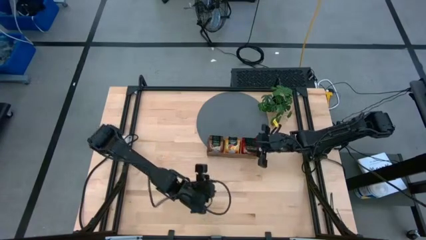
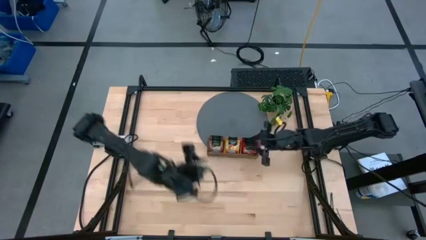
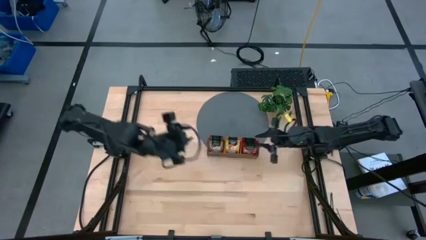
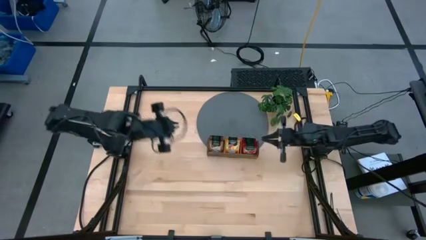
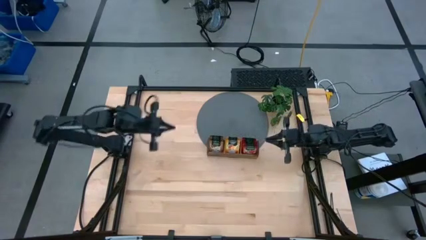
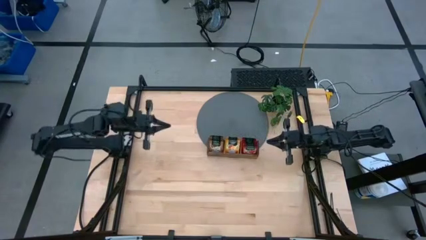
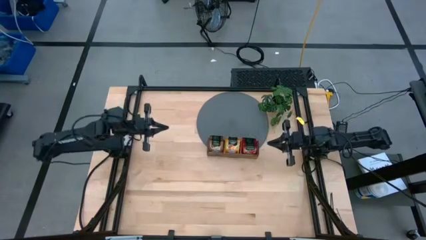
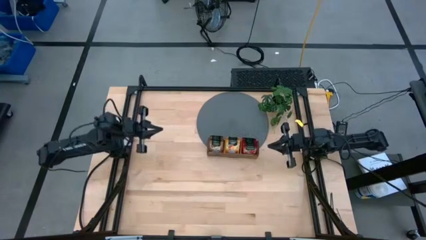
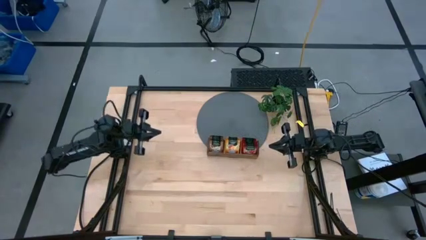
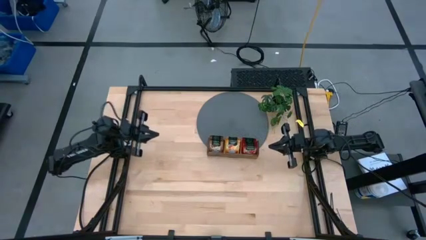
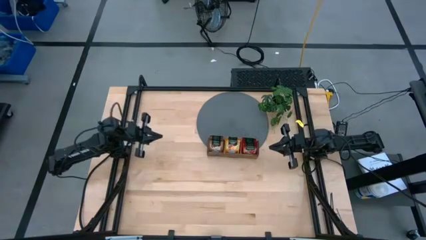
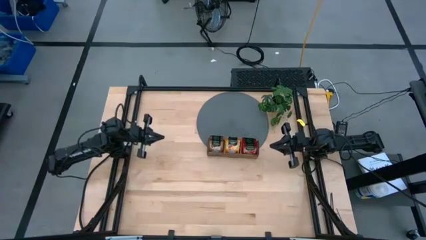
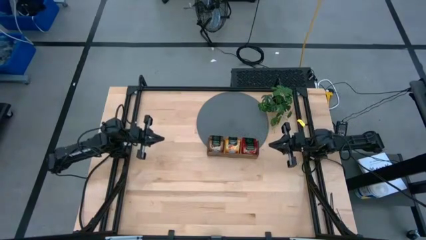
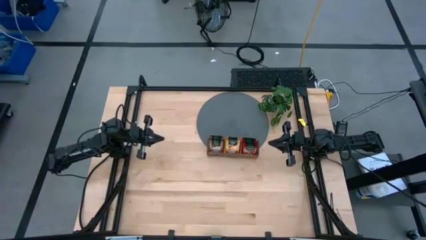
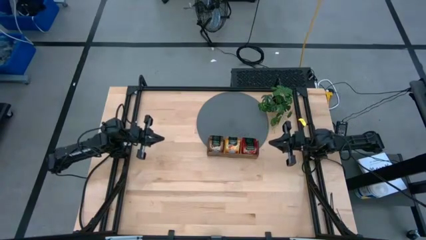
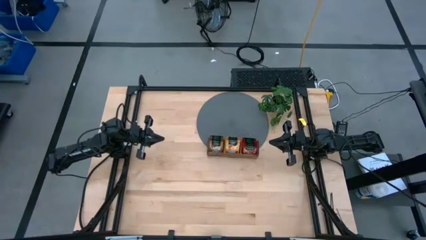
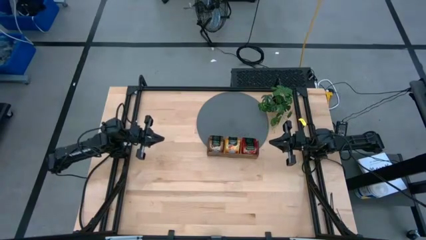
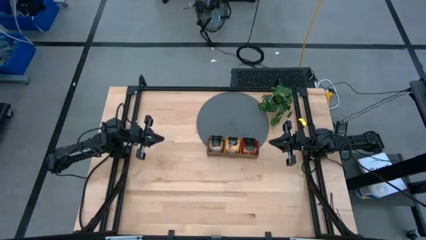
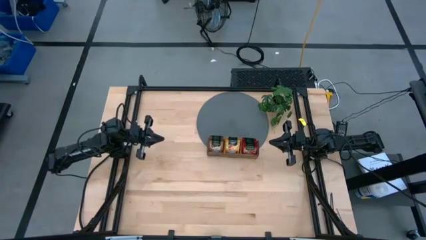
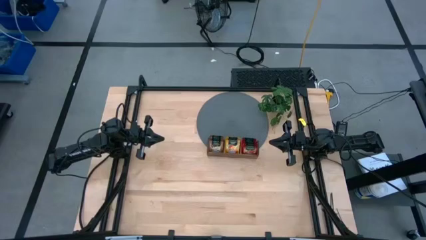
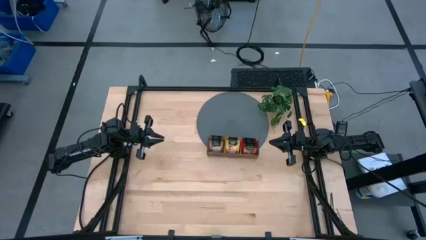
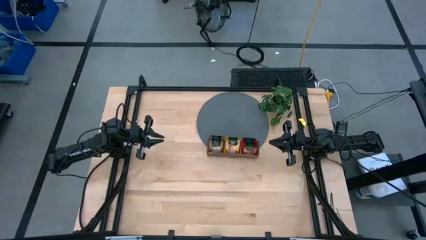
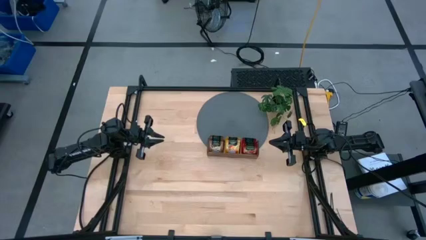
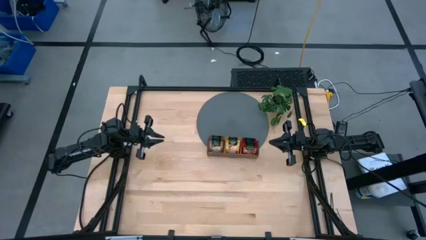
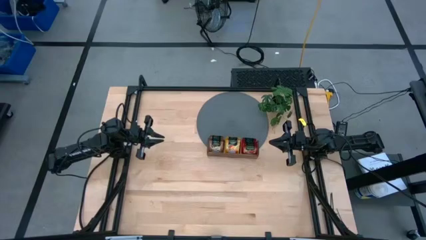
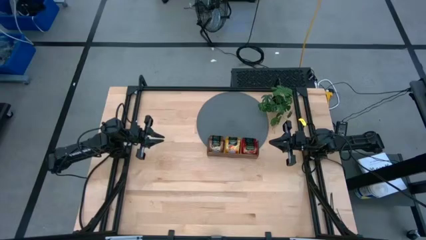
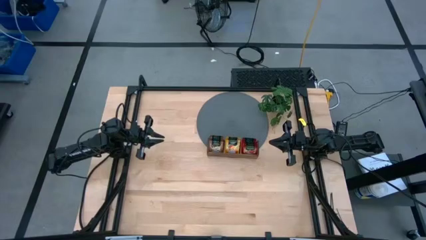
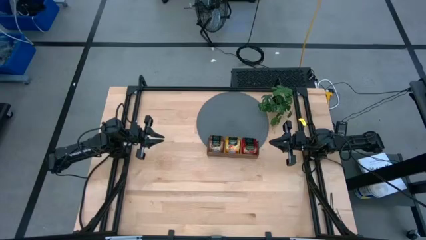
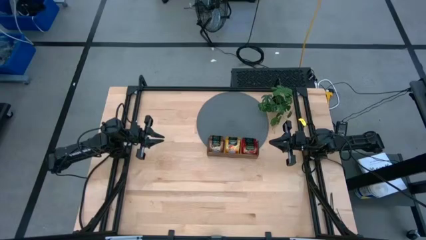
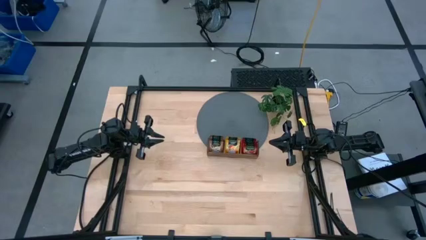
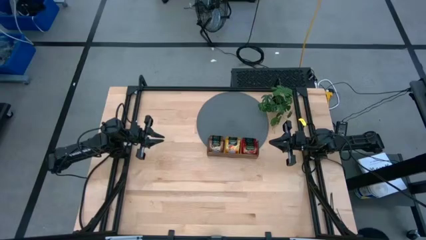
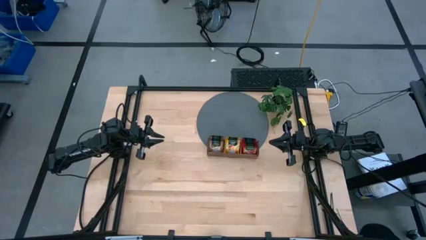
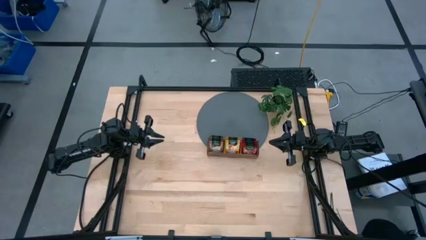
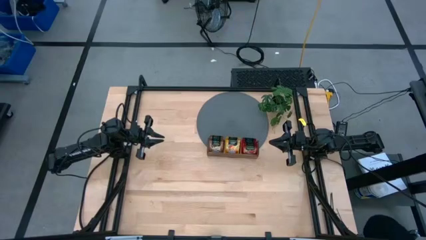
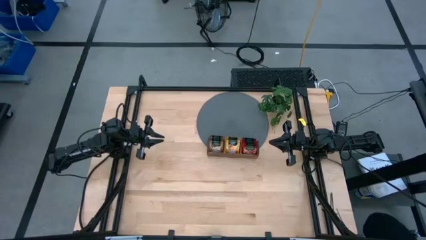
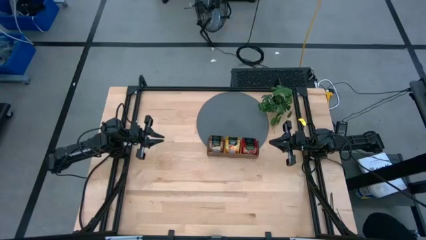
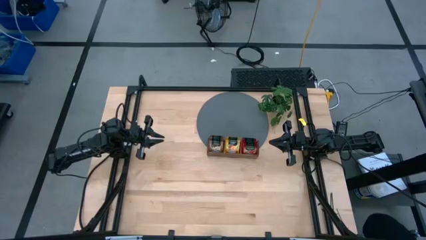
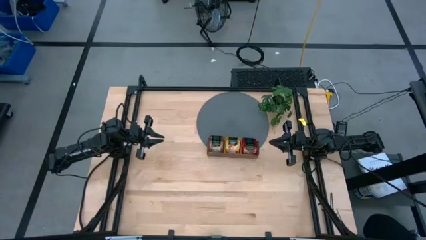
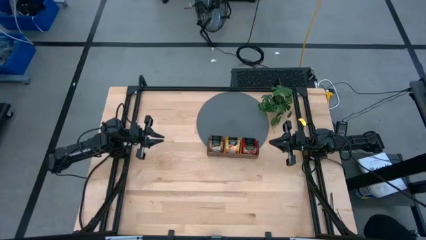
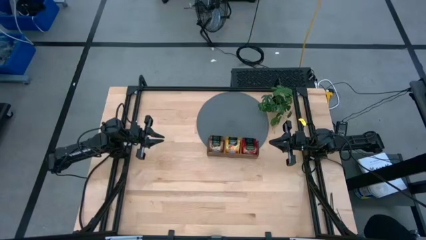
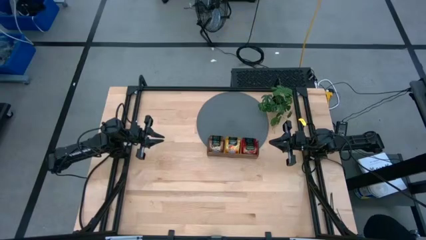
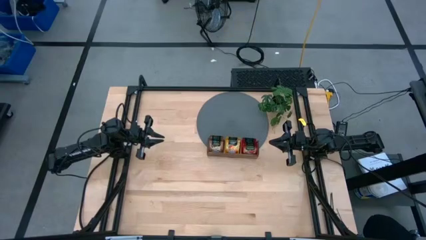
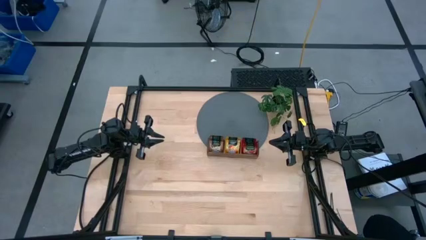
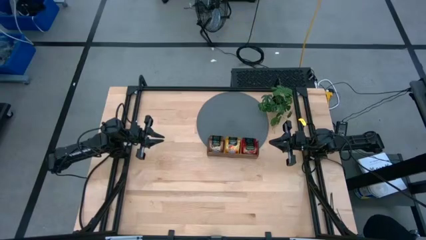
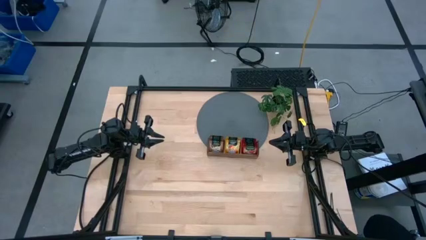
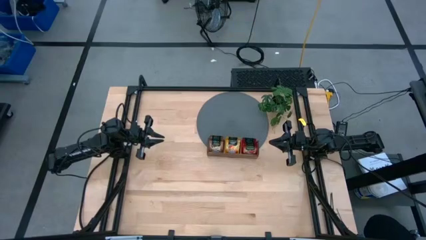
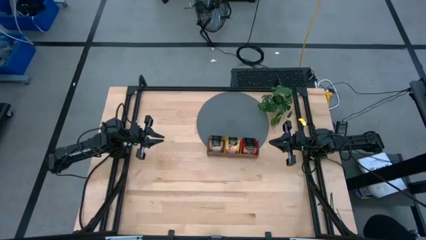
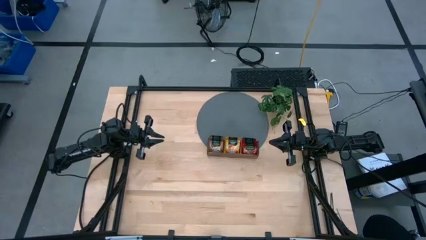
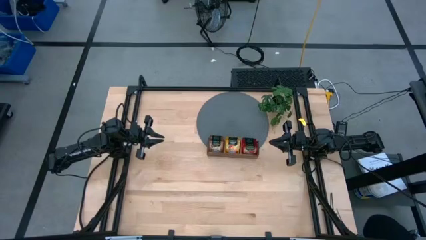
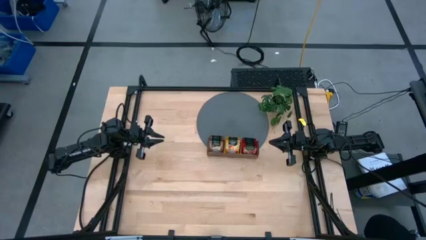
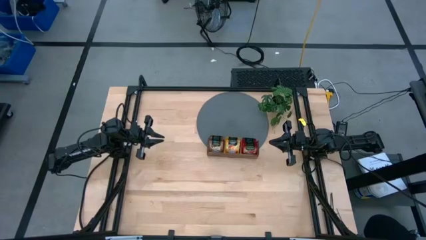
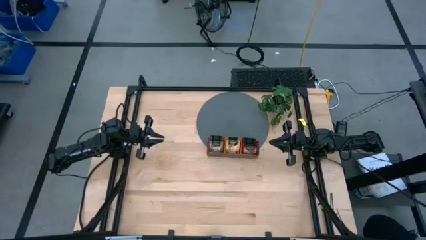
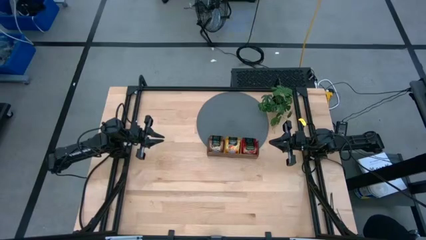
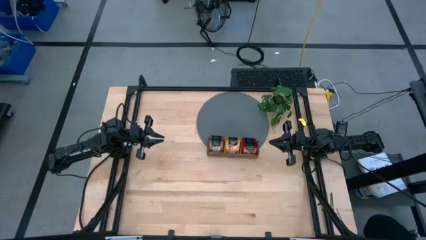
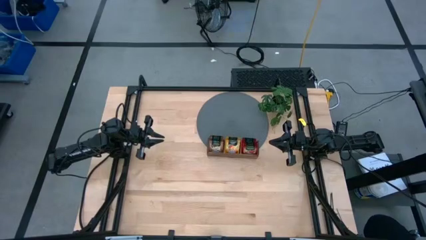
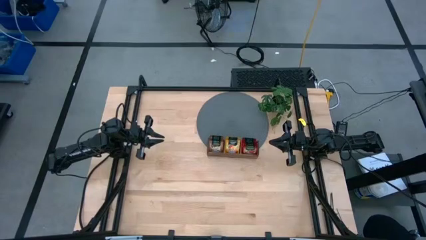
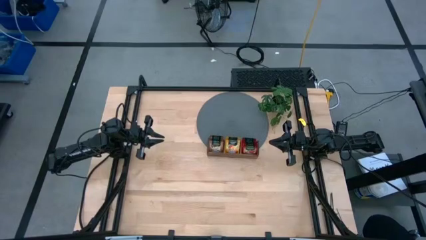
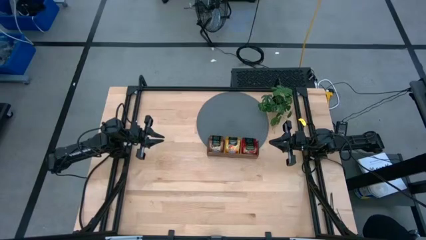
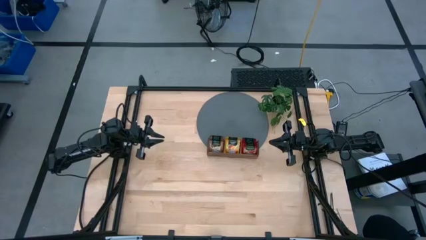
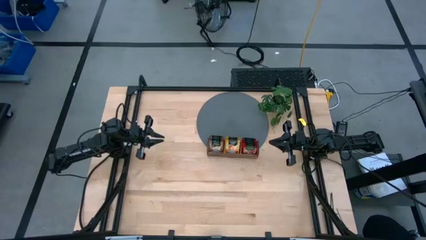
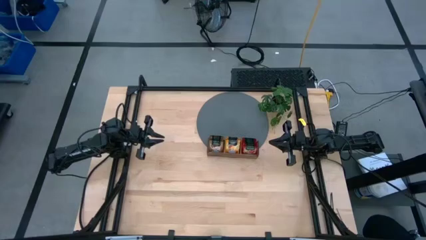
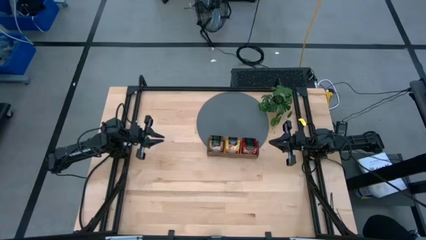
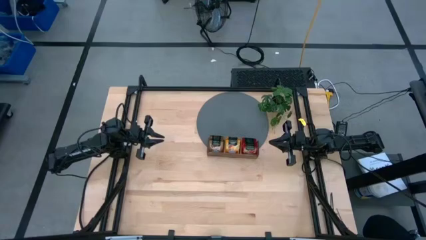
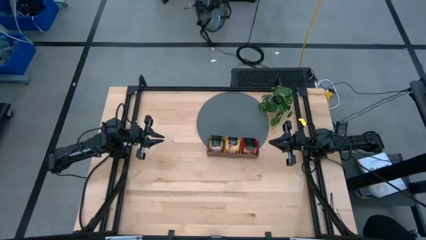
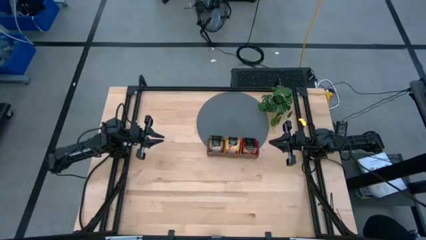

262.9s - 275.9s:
Task: Pick & Place Tea
Return to Home Position
